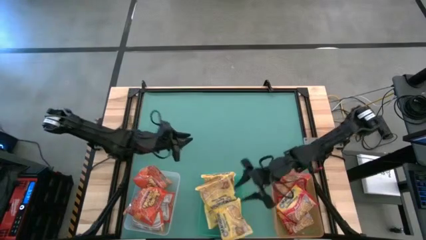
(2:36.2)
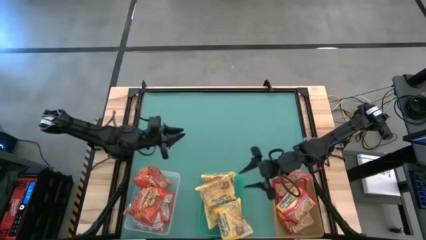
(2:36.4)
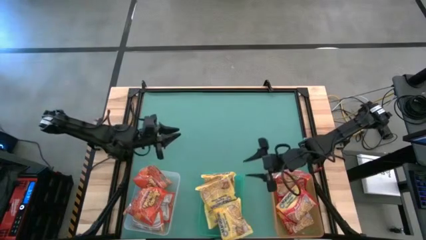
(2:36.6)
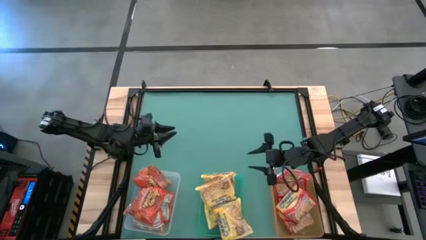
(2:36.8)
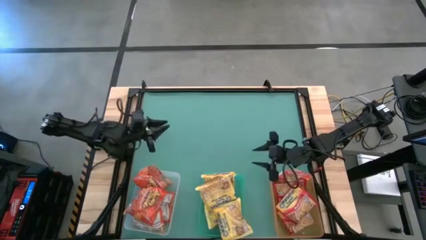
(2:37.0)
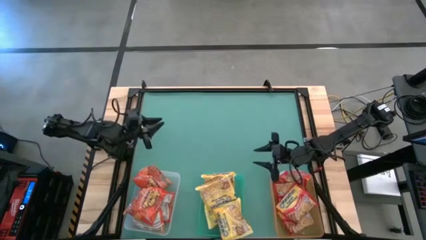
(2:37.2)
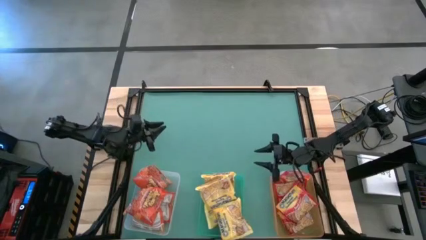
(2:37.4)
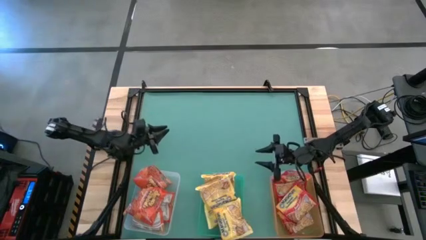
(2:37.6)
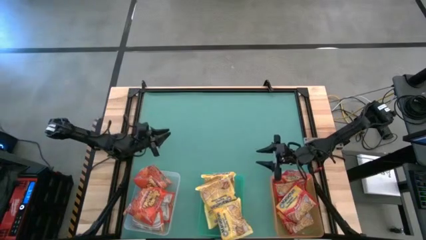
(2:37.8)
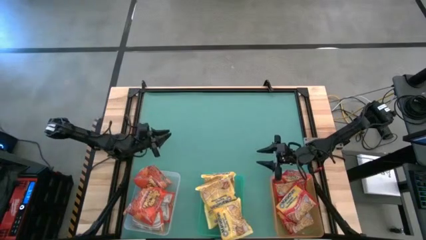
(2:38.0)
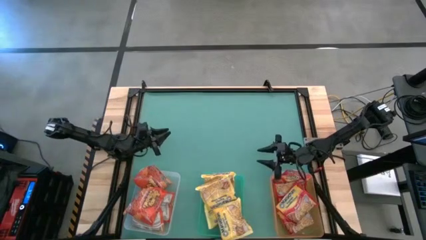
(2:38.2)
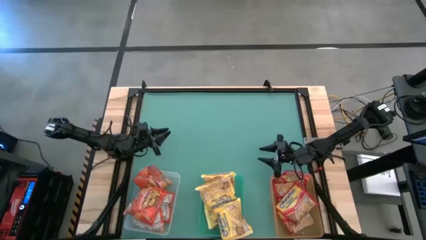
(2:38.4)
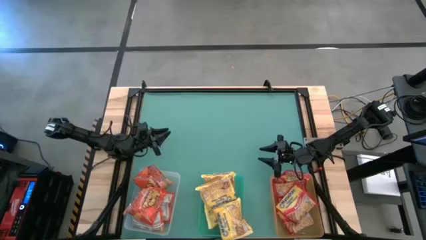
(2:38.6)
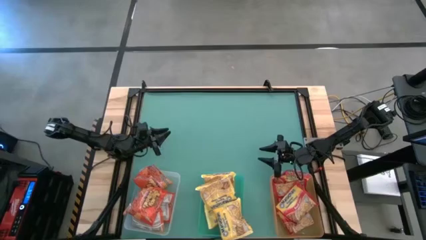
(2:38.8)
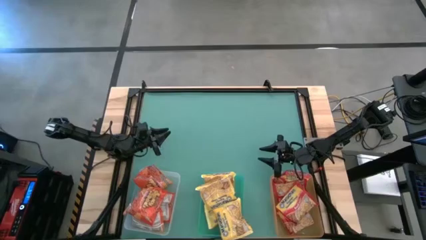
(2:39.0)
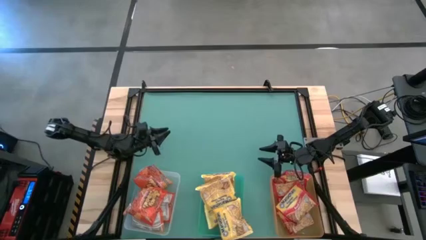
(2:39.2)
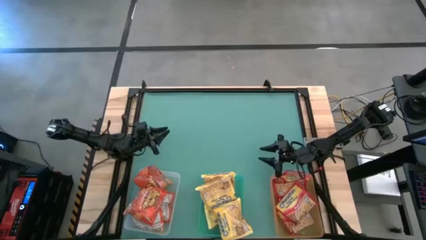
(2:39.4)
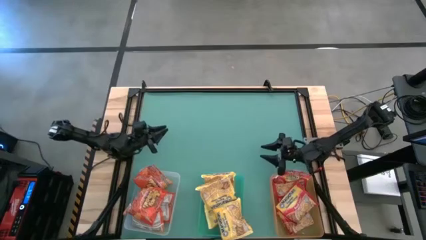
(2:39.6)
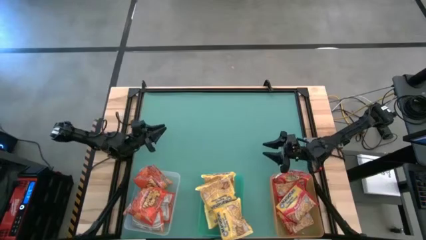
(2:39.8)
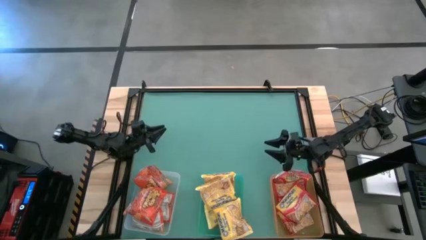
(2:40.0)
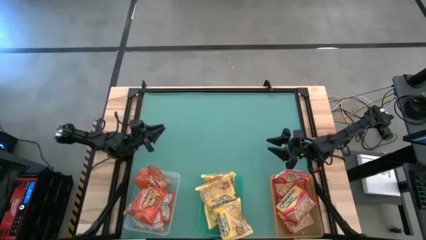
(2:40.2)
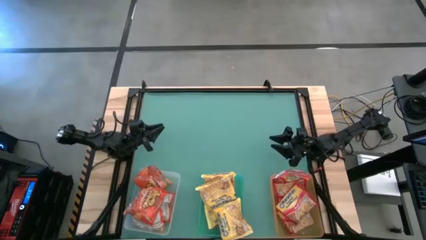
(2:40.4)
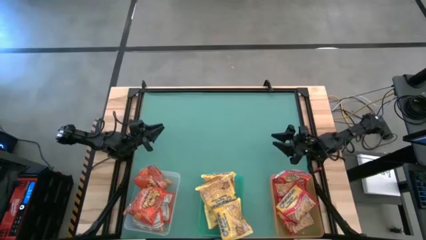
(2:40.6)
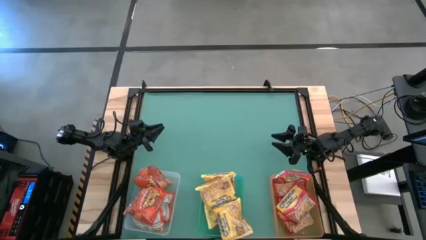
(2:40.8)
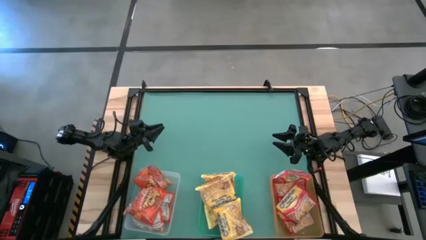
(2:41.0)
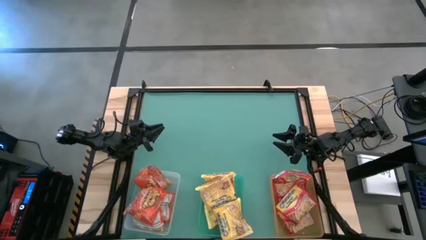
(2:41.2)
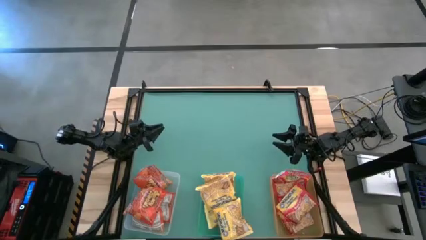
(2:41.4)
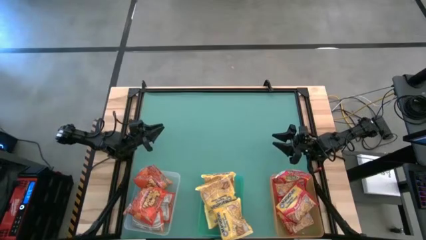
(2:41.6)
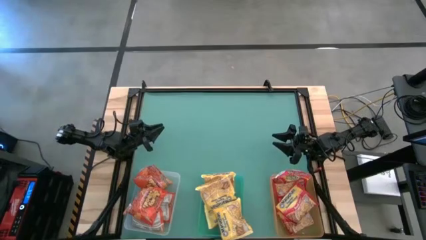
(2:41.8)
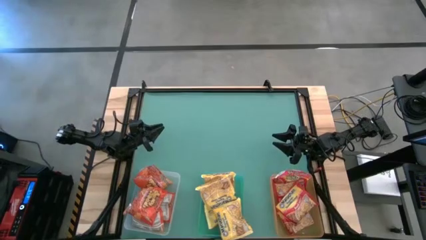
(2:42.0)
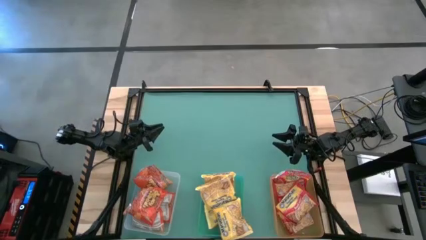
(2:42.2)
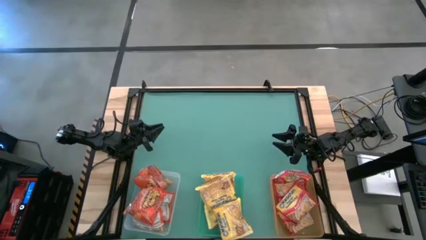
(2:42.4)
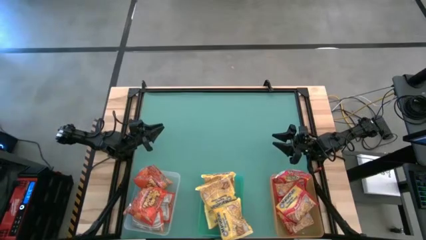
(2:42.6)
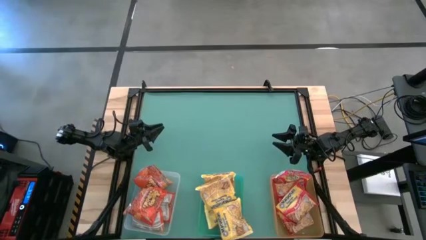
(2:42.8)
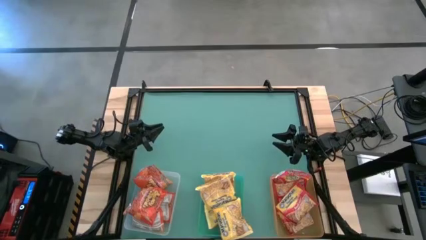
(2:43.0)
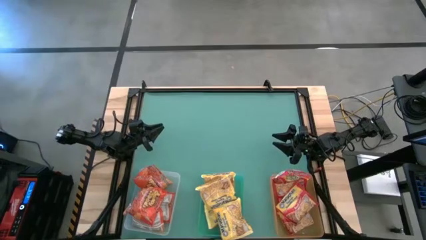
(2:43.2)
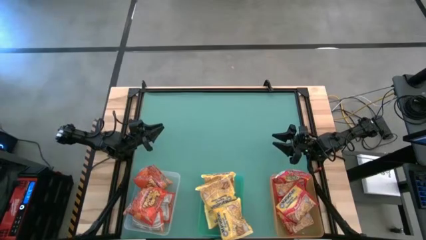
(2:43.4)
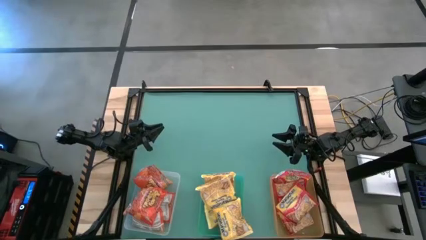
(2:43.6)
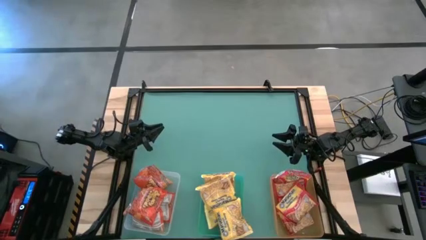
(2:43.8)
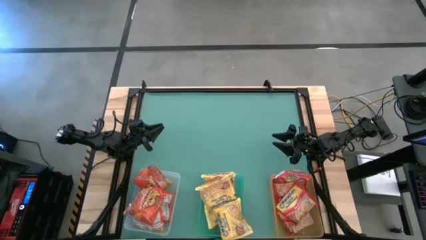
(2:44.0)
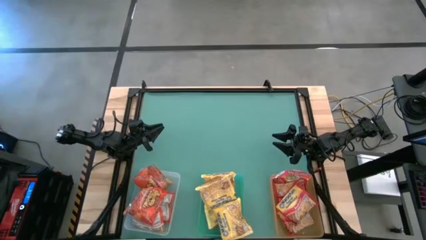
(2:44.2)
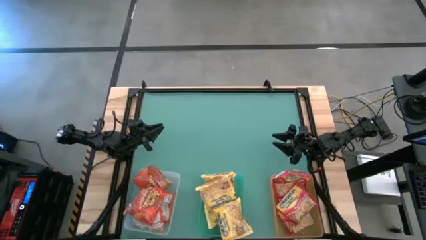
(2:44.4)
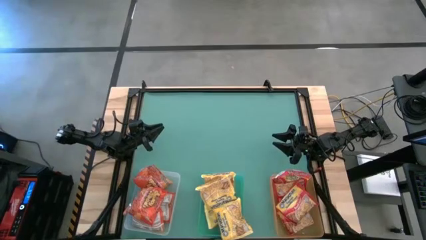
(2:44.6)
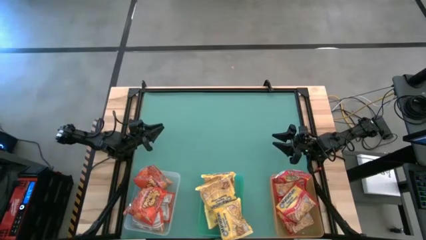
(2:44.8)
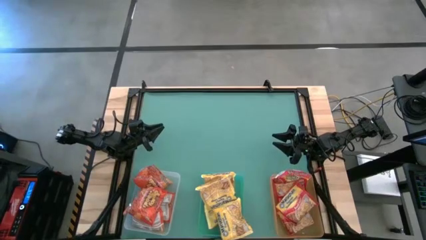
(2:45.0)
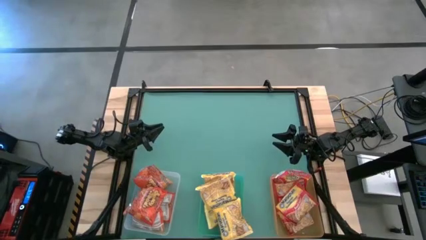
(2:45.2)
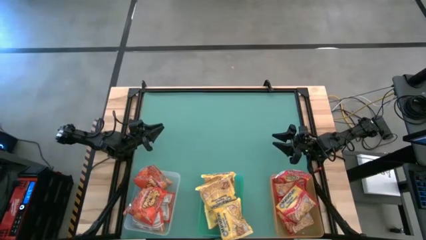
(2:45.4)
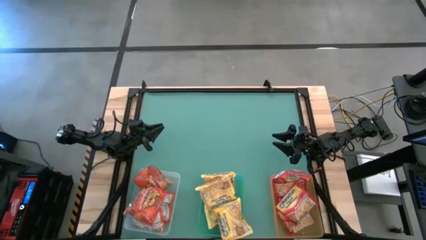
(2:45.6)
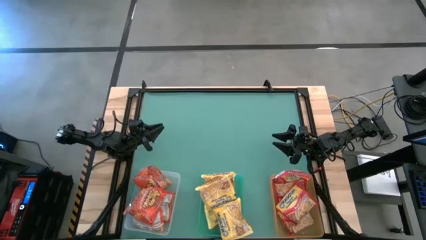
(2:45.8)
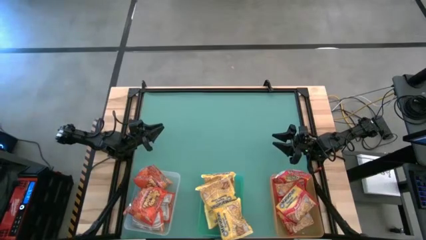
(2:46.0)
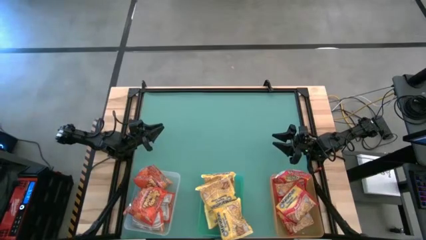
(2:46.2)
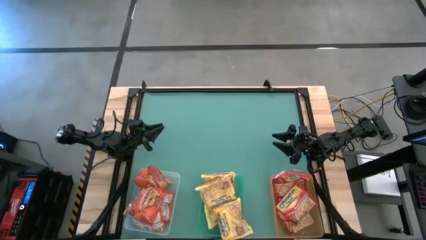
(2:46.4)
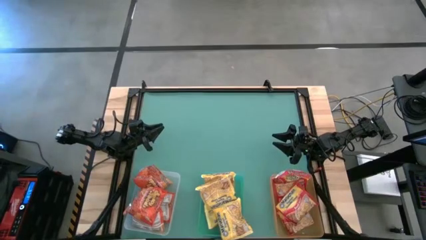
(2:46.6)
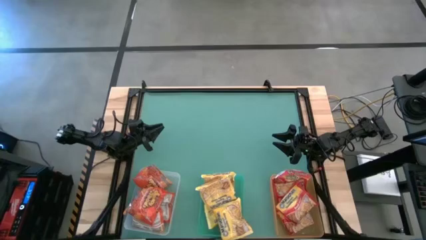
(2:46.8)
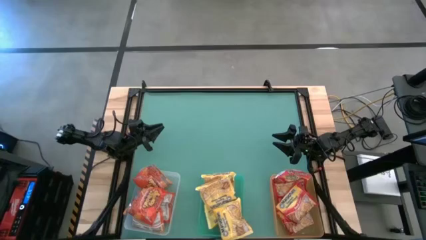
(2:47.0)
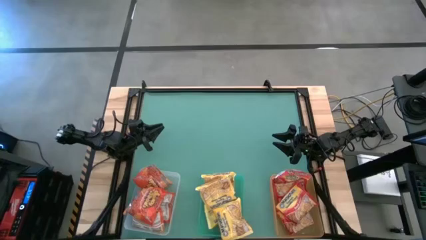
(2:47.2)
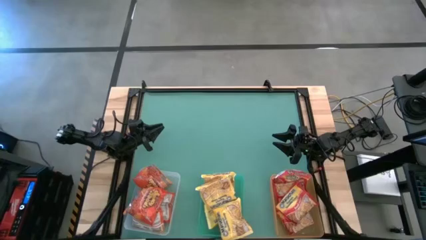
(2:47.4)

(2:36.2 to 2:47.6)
Task: Sort Maruchan noodles
Return to Home Position

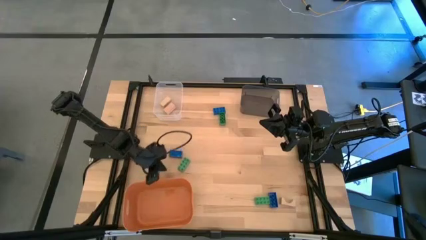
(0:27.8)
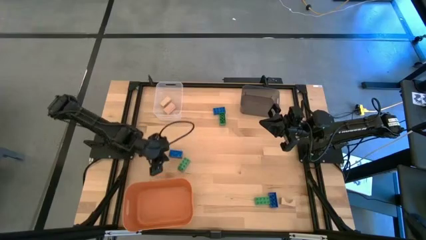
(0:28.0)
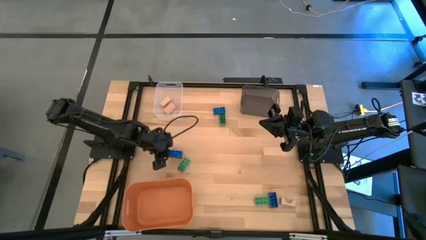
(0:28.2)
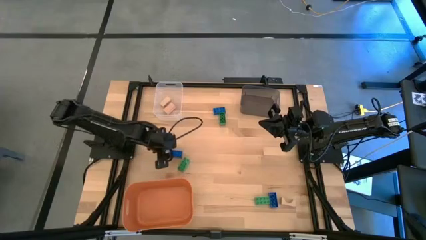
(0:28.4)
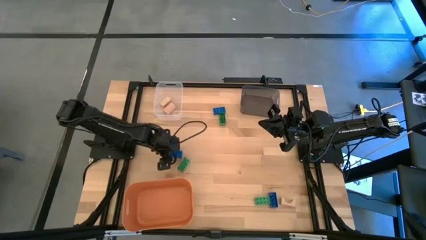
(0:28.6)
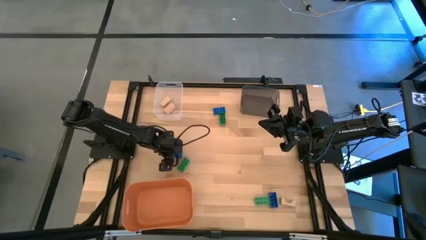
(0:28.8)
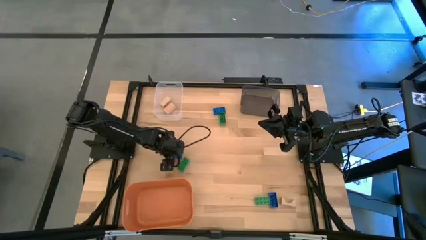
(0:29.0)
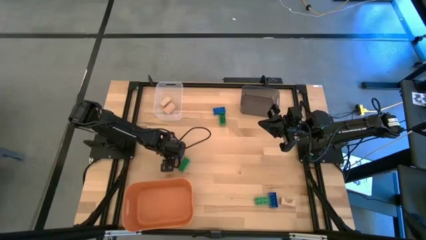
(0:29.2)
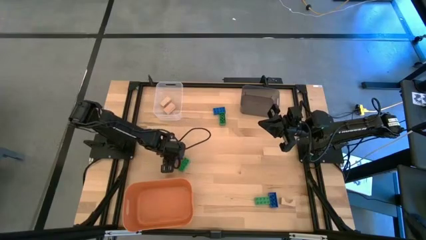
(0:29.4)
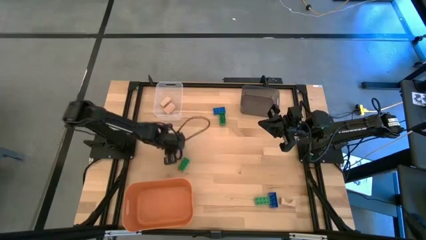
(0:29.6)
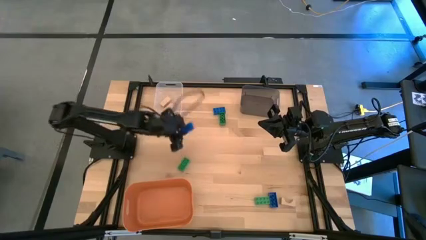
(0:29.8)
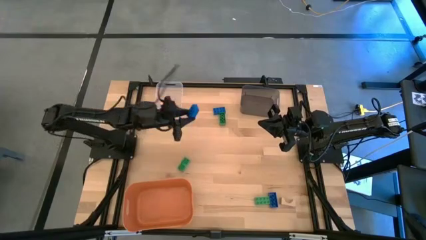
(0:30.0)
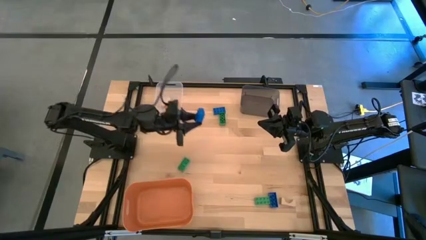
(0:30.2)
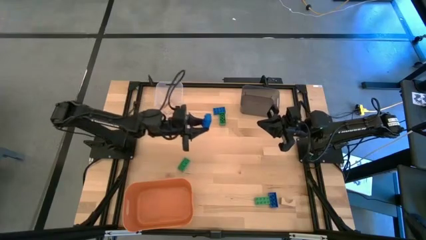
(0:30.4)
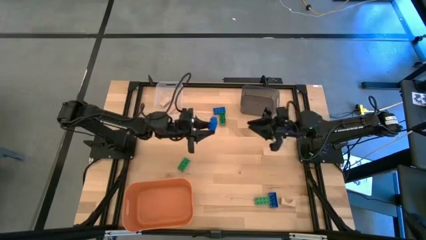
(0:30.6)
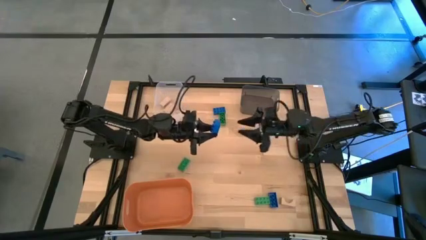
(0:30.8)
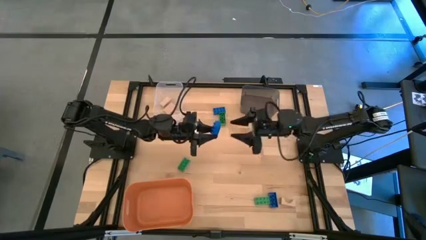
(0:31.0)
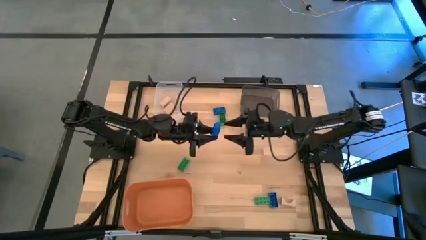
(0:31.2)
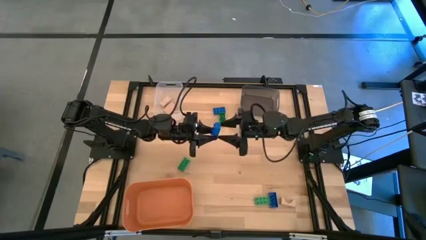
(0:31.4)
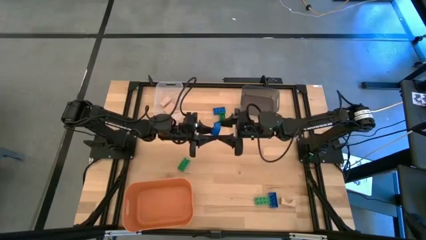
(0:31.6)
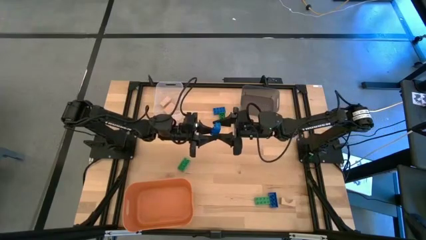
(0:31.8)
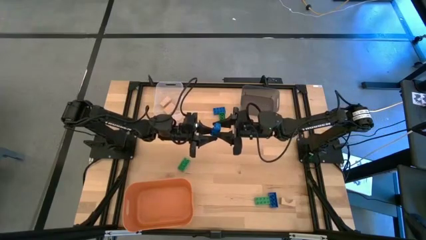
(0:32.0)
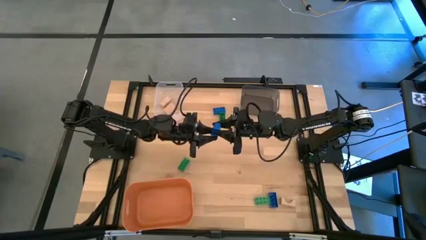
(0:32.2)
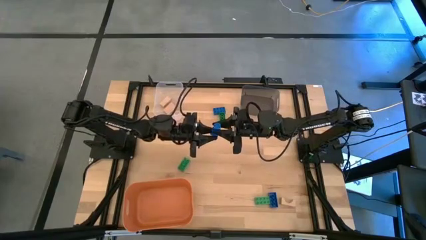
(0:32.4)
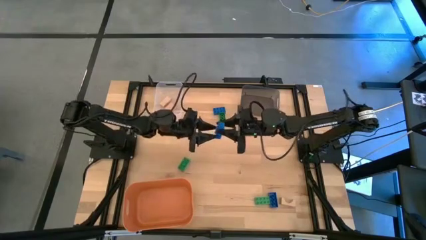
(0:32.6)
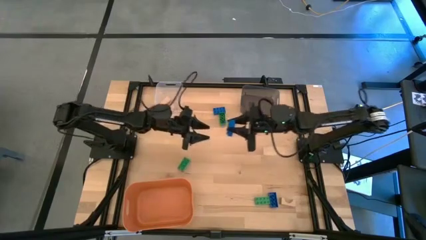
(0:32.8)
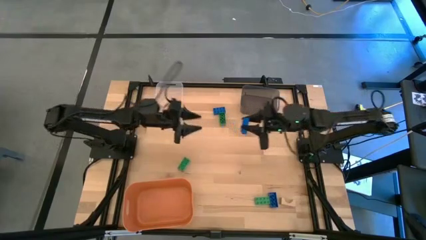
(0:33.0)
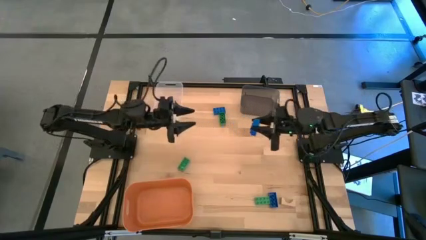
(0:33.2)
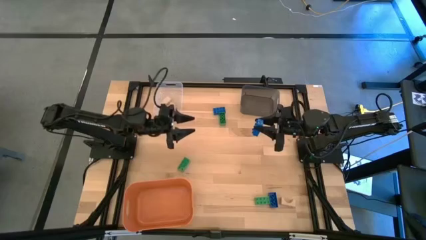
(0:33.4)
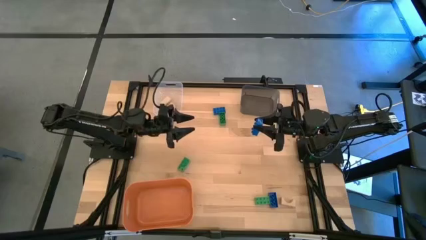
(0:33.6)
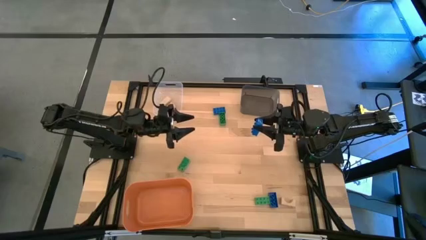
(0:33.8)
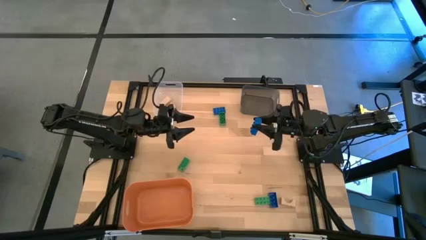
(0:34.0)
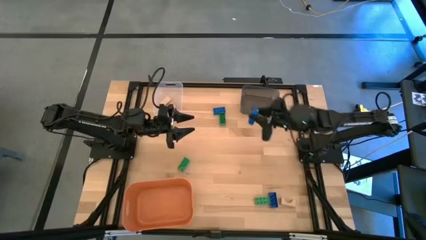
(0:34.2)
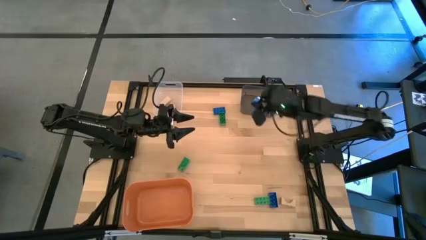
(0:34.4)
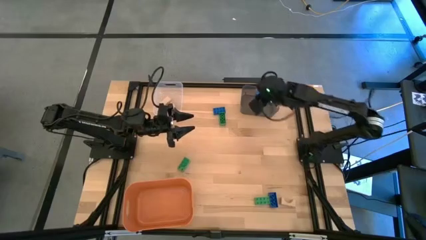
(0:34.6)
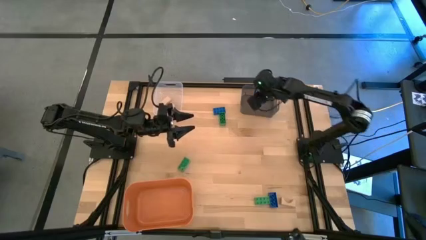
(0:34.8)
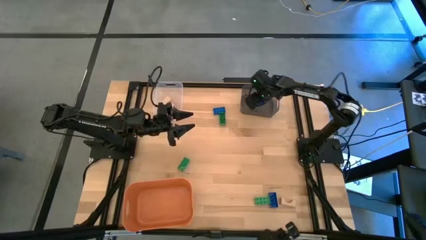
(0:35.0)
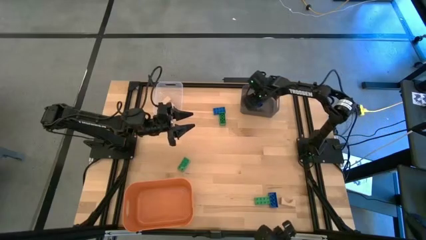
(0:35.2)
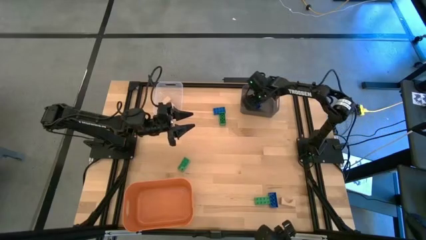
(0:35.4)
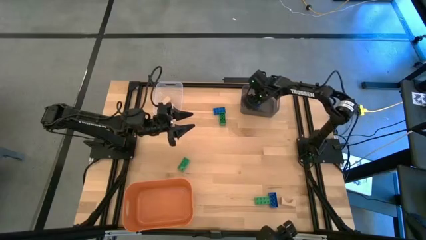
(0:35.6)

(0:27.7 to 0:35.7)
Task: Sort & place blocks by color
Put the middle blue game piece into the black bin
